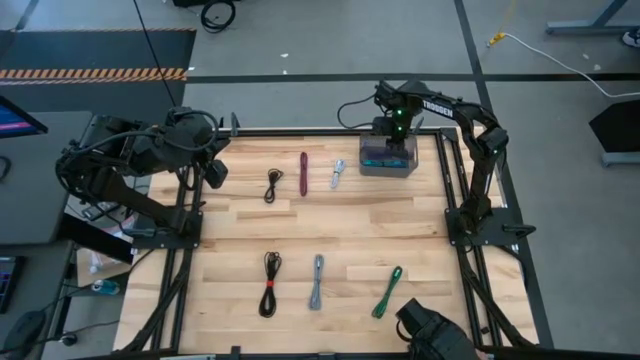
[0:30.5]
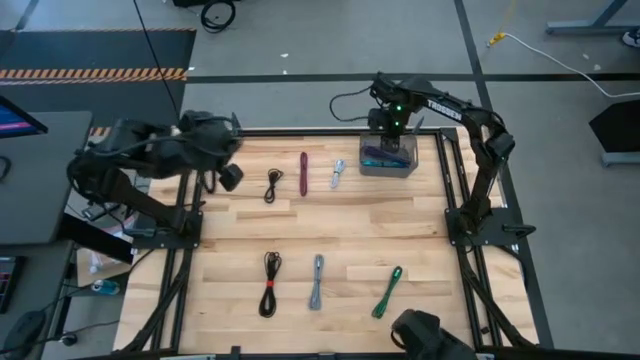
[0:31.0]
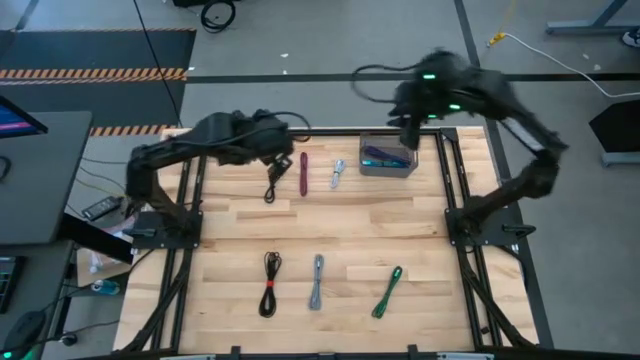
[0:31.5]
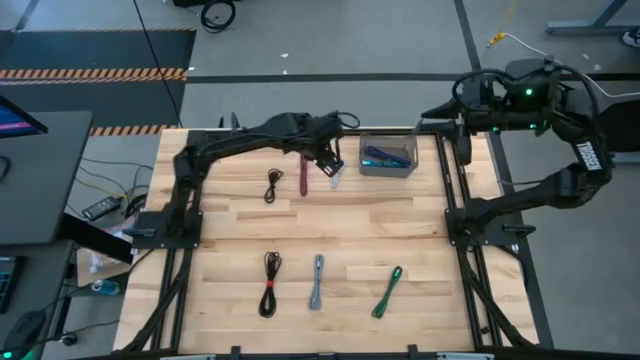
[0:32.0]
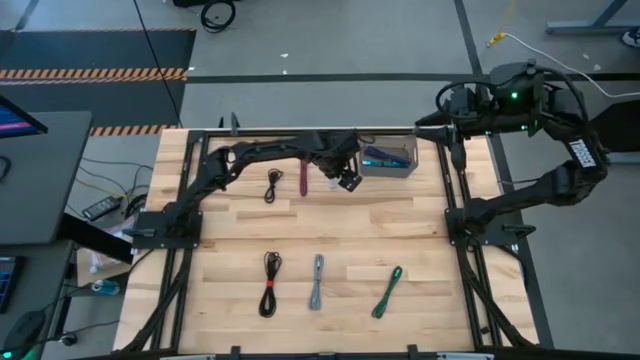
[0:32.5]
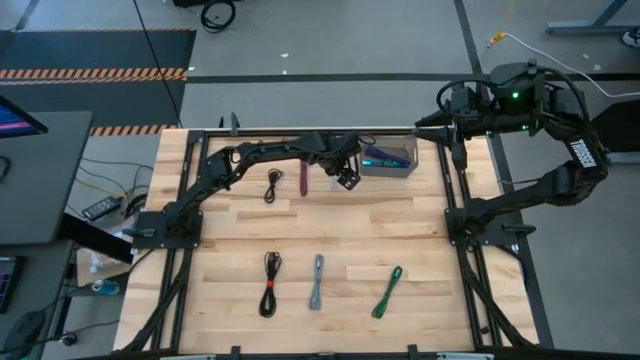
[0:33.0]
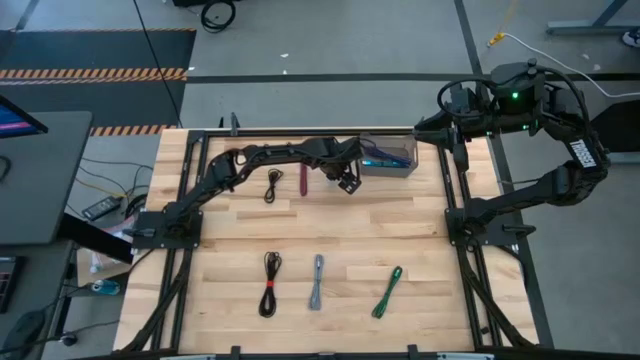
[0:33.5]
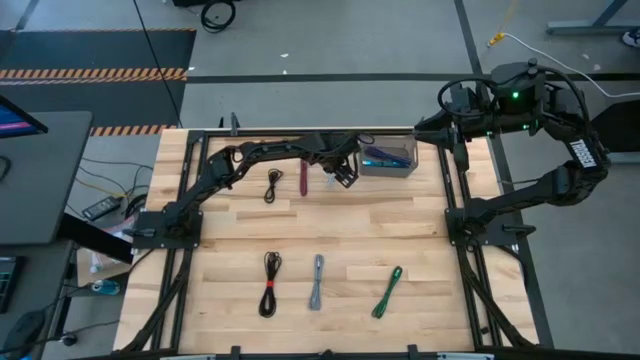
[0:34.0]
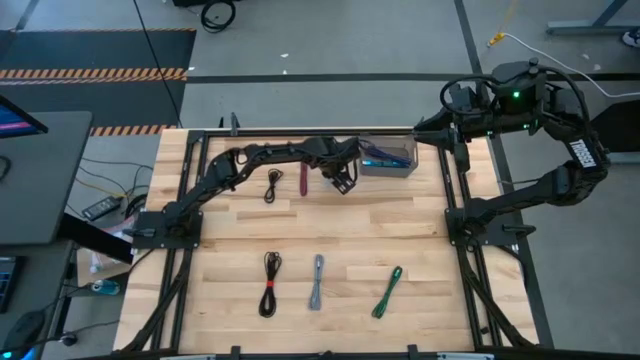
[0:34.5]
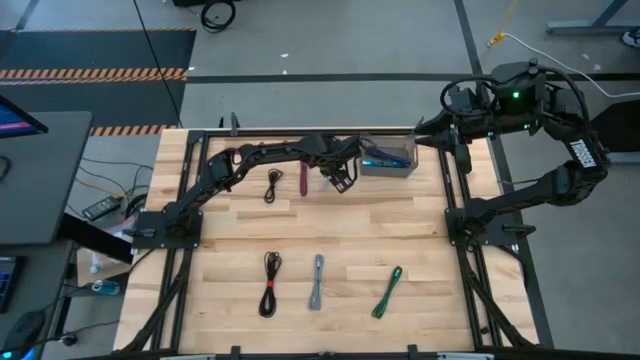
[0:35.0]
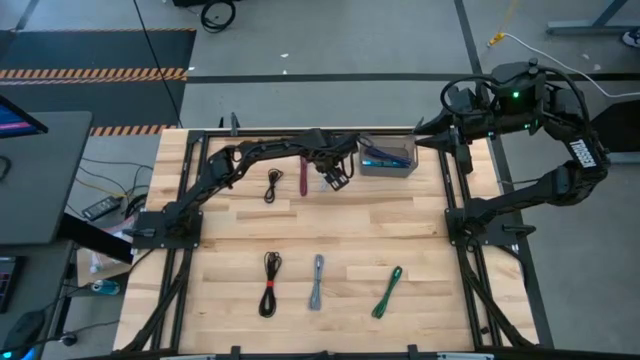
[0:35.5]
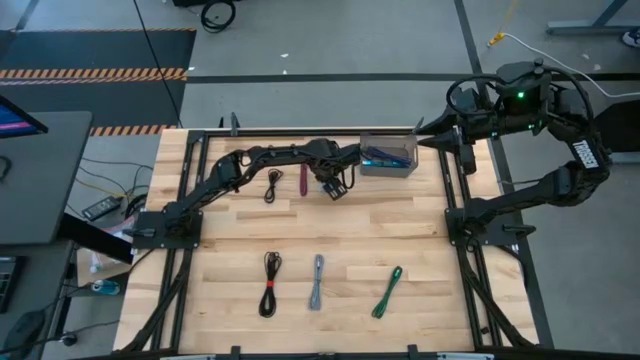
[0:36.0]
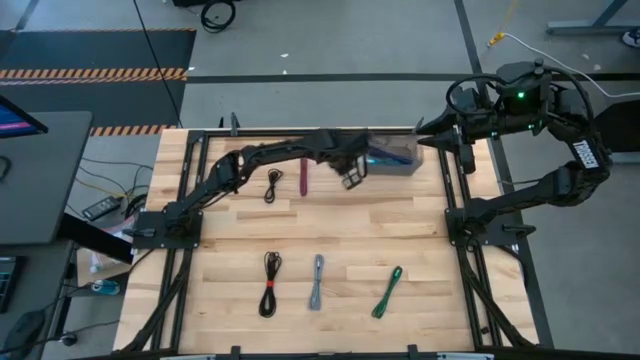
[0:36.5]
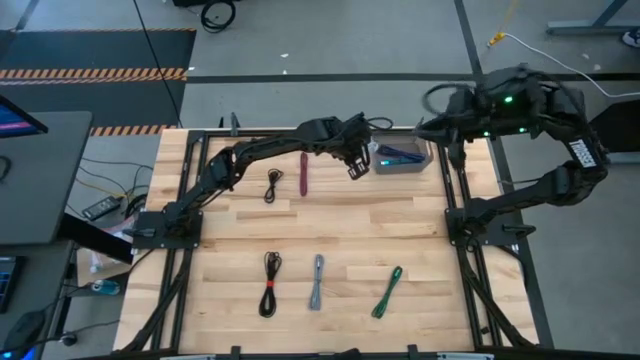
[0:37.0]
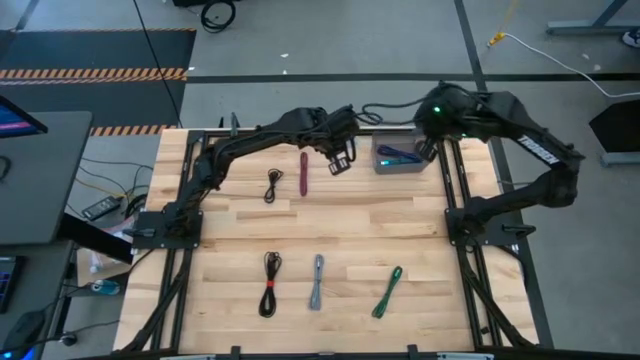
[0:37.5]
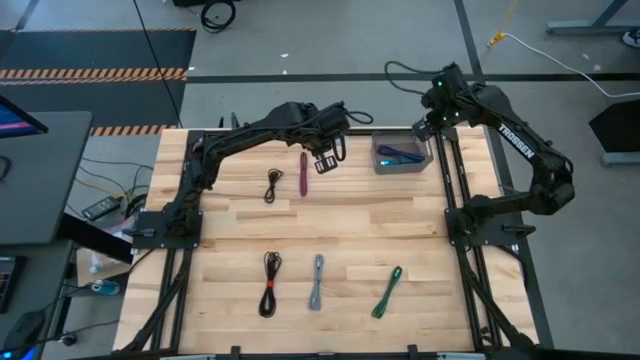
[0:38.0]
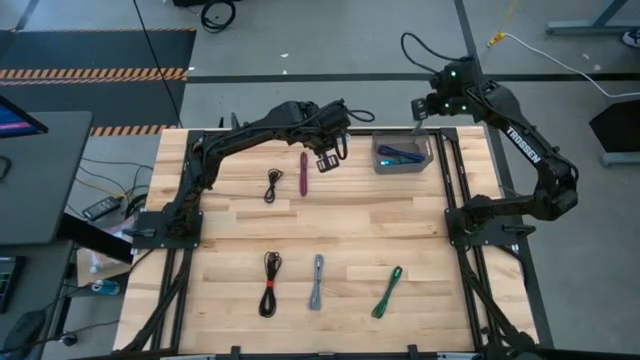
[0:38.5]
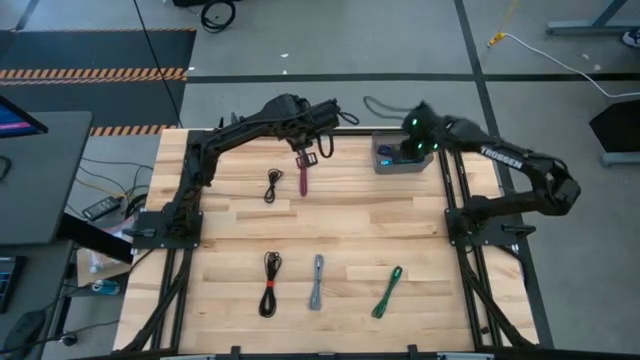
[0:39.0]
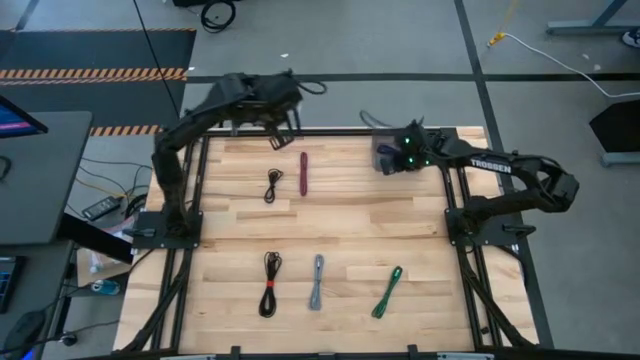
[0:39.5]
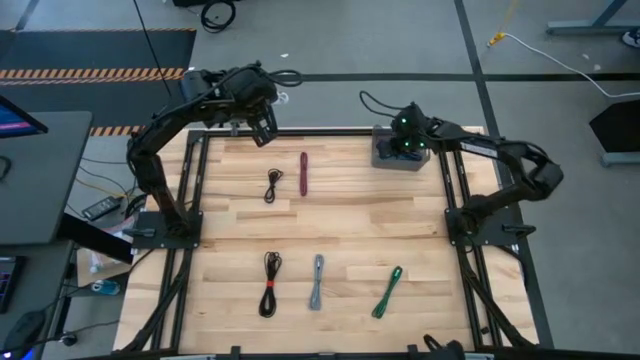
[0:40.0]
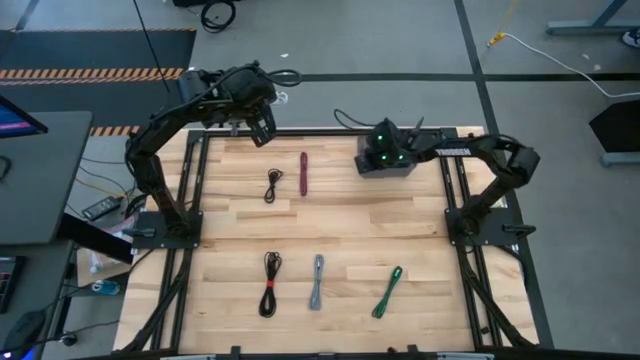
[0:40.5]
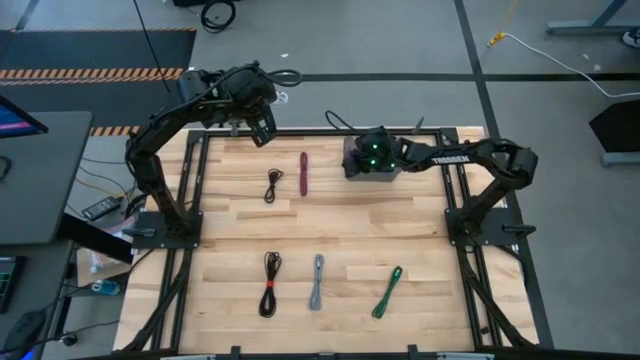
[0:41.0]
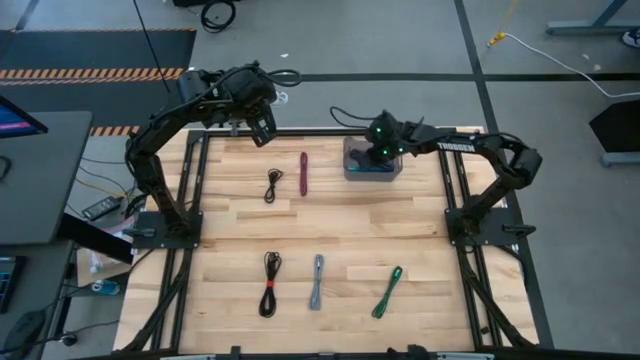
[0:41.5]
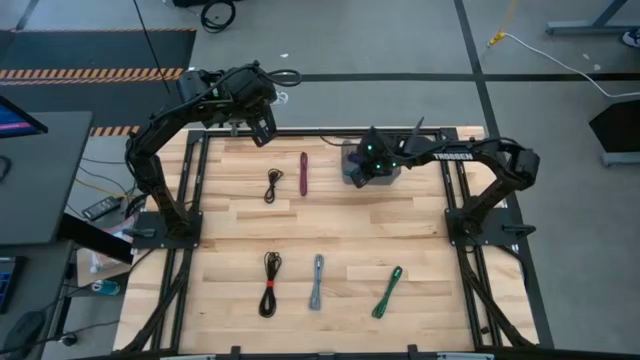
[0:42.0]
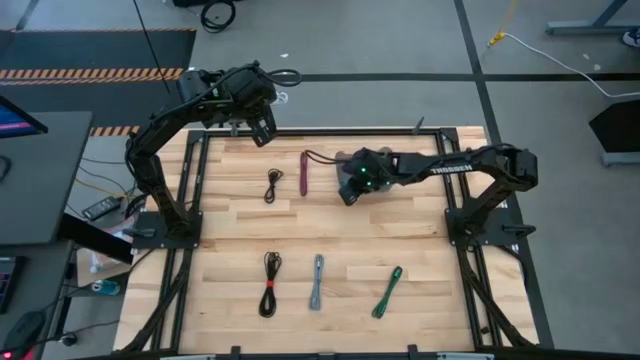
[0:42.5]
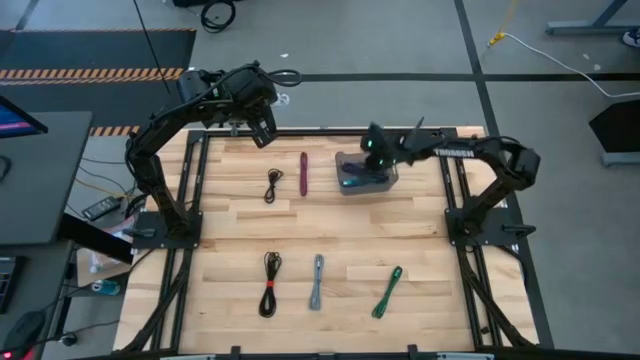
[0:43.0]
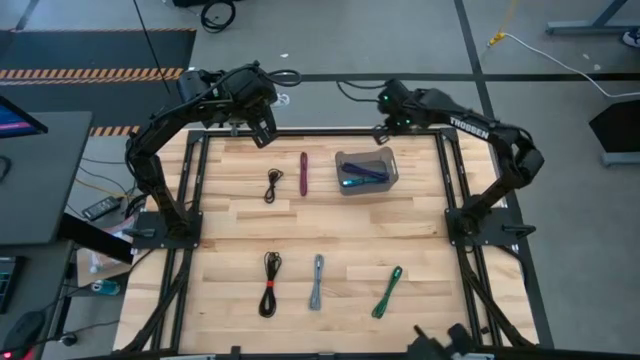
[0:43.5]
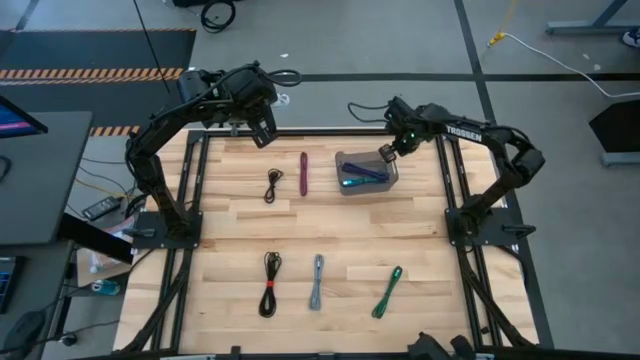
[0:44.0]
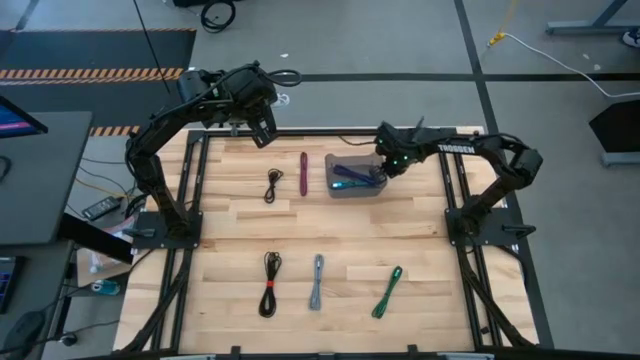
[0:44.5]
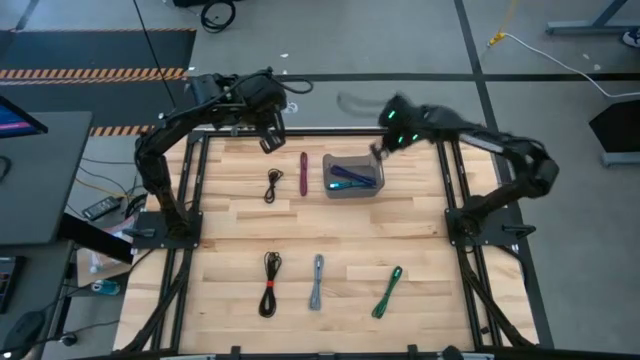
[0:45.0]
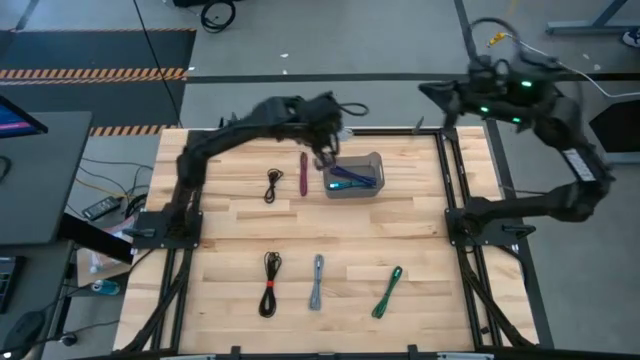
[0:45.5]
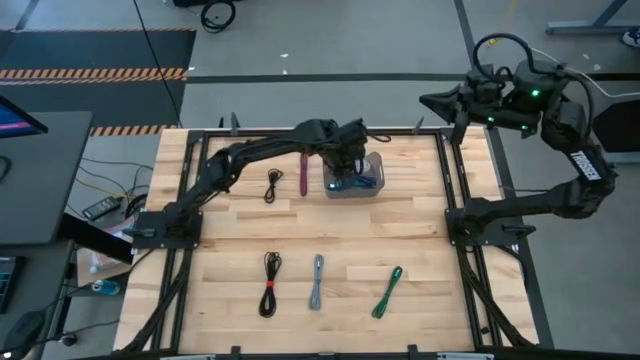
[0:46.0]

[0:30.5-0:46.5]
Task: Pick and place USB-C Cables
Put the white charger cable into the black bin

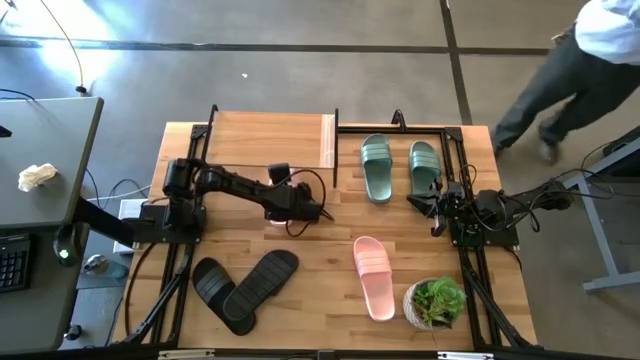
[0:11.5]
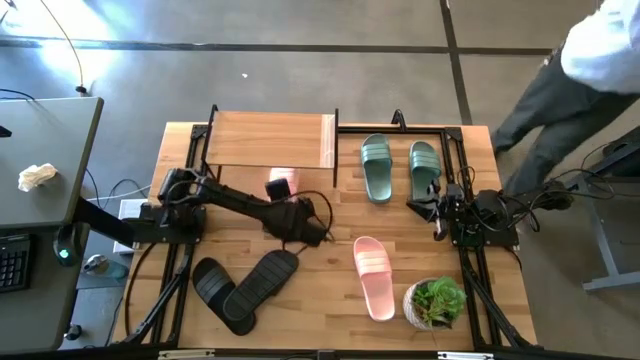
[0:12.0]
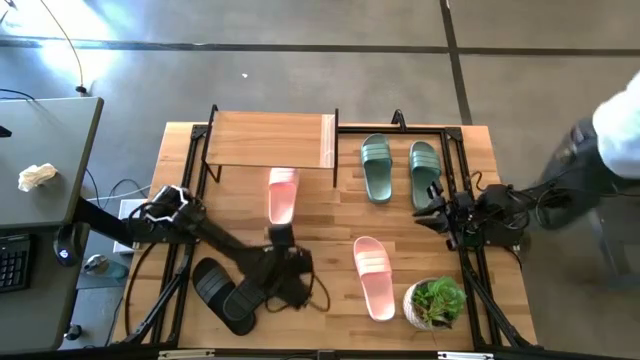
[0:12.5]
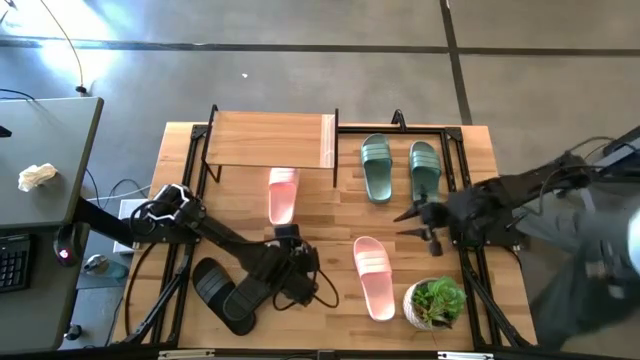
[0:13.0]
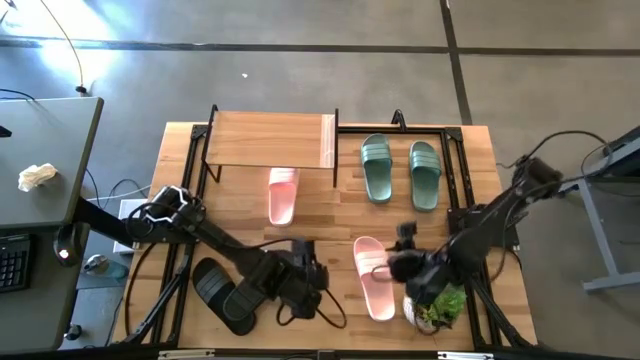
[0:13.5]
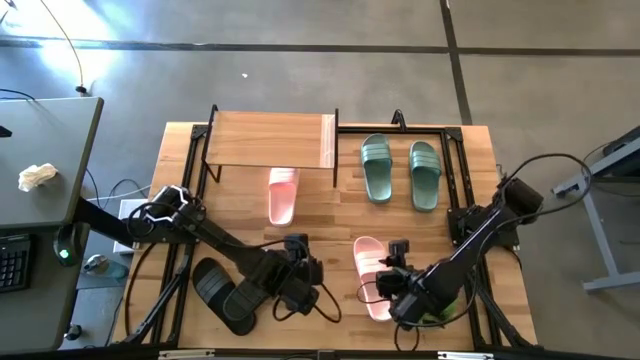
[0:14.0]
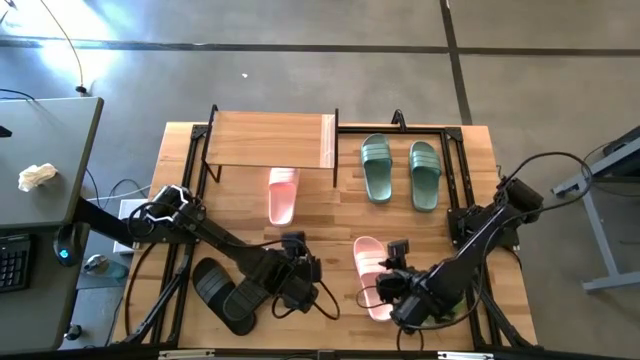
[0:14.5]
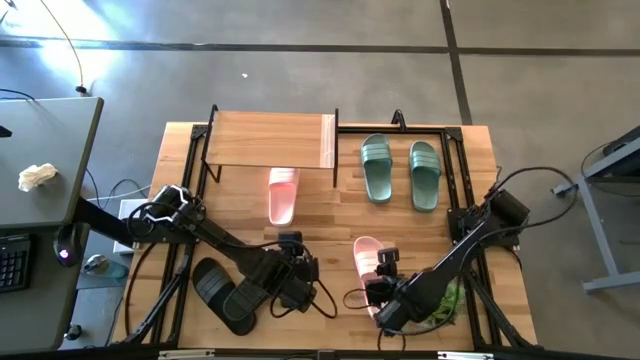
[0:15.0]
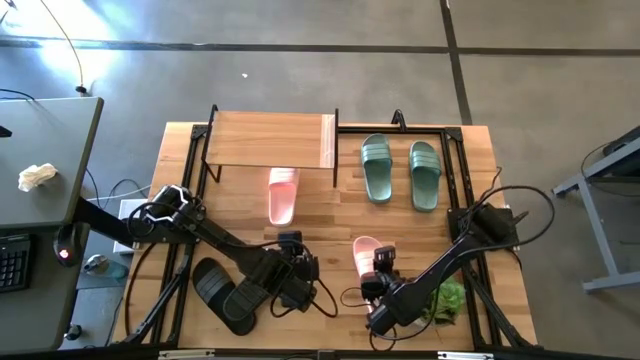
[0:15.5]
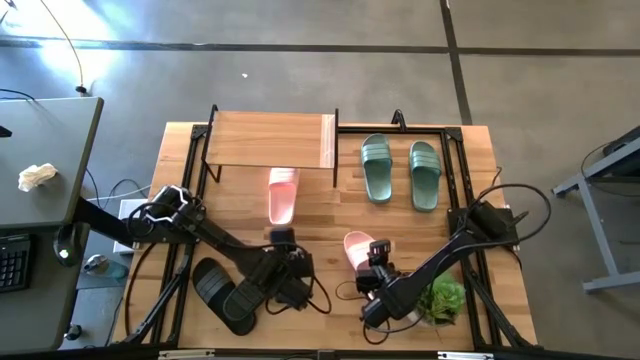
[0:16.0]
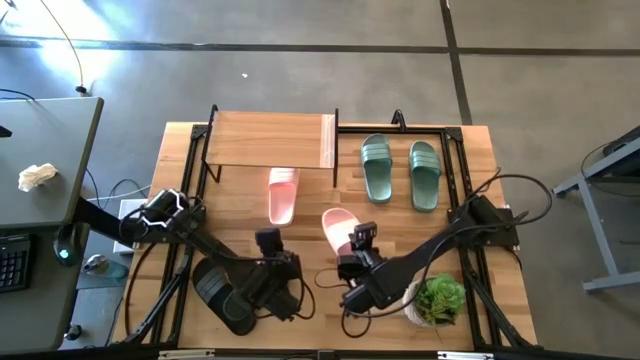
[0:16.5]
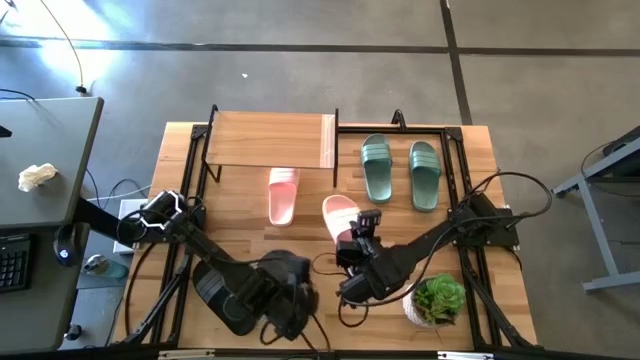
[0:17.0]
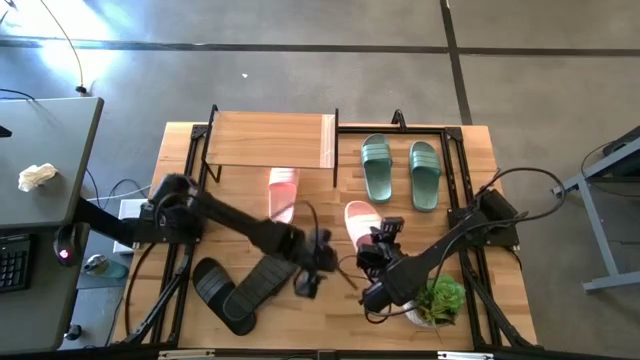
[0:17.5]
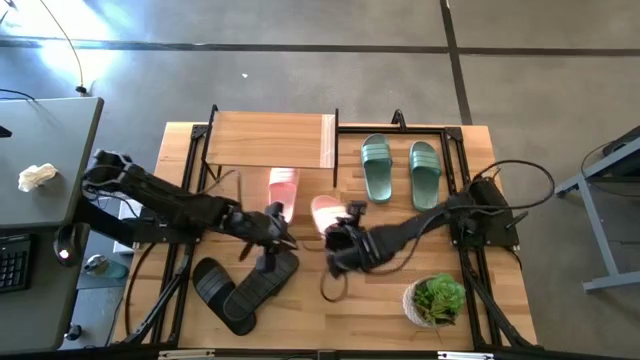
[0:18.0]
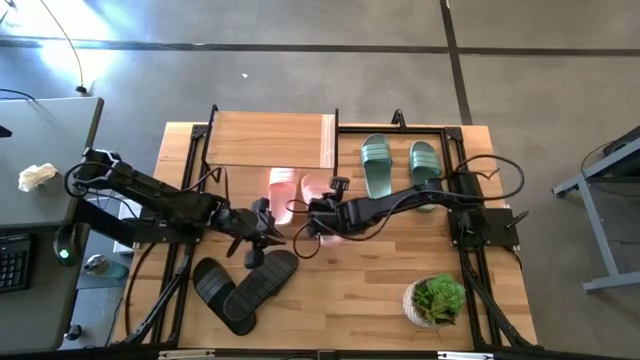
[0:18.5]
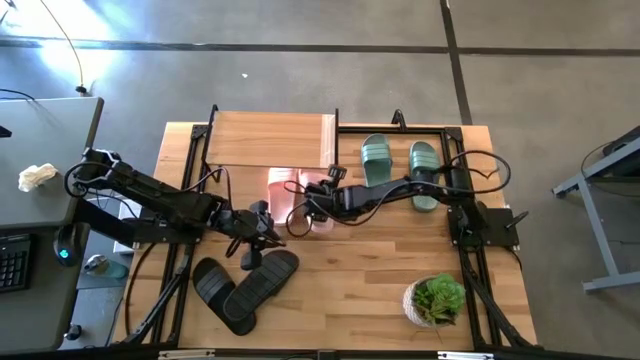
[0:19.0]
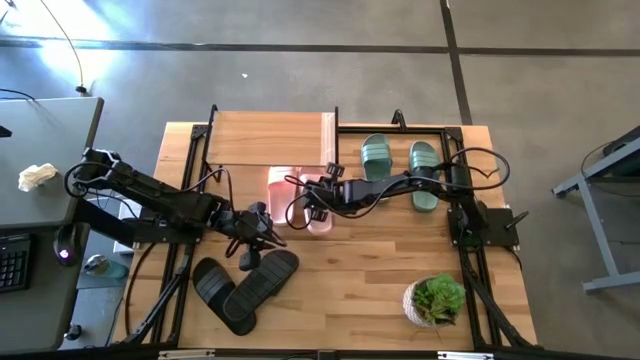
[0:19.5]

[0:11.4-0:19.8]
Task: Pick and place slides into the shelf
Put the right pink slipper under the shelf
